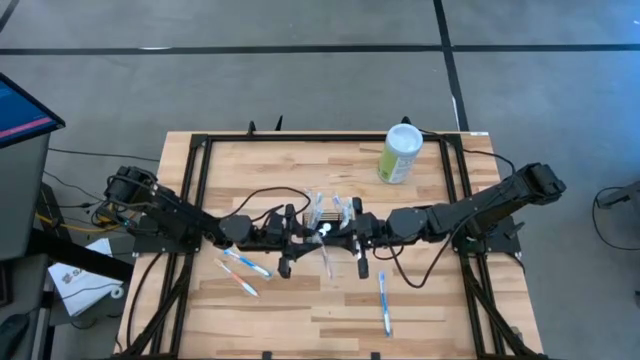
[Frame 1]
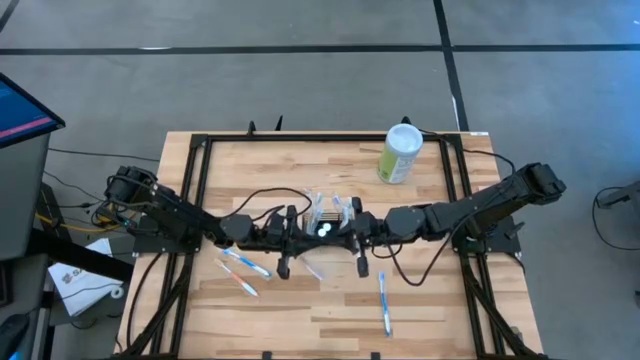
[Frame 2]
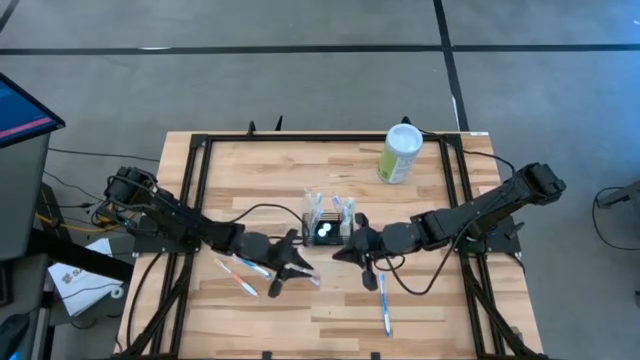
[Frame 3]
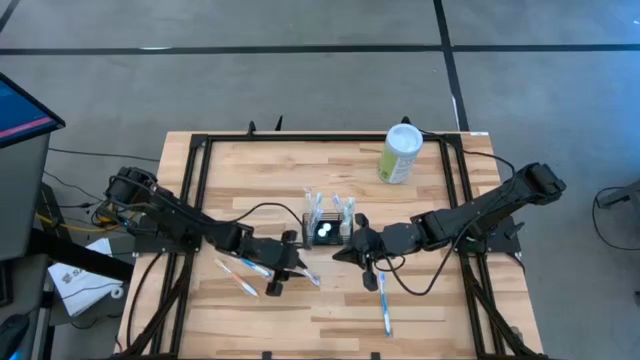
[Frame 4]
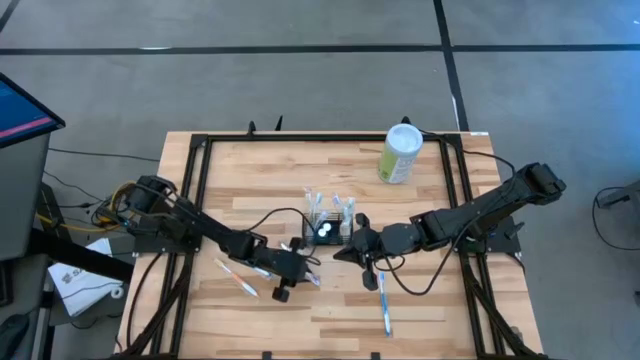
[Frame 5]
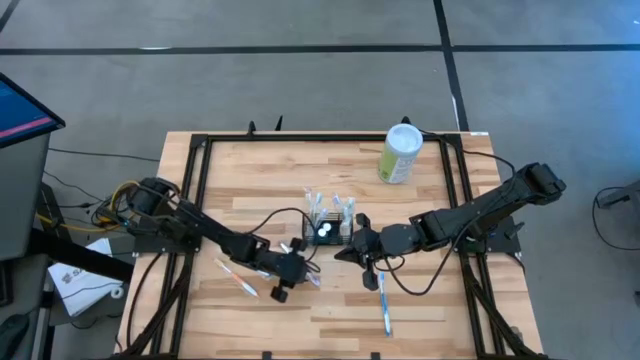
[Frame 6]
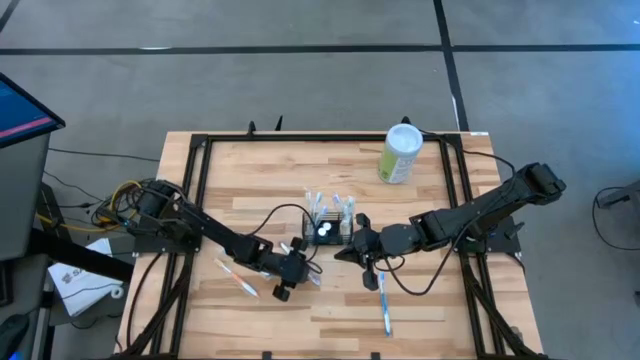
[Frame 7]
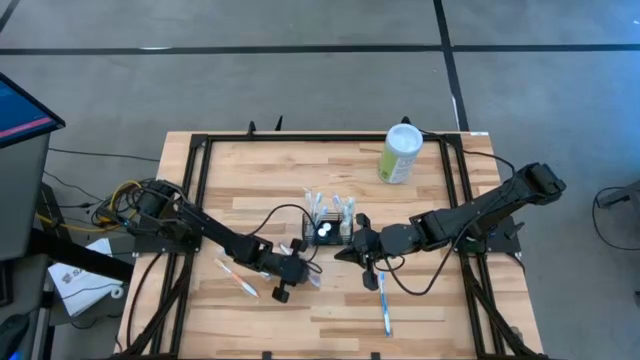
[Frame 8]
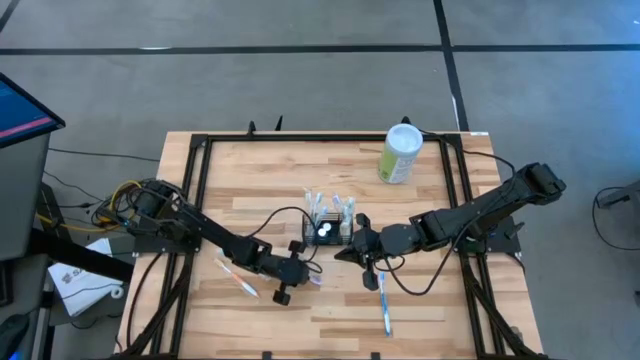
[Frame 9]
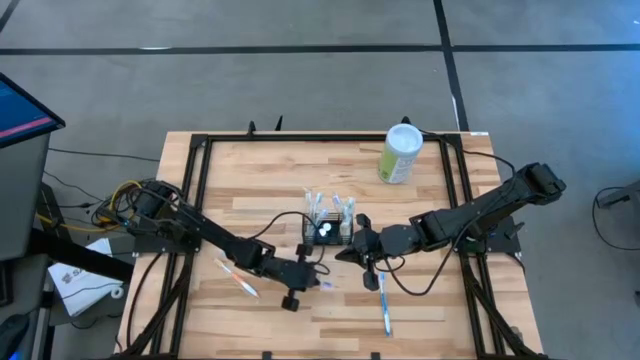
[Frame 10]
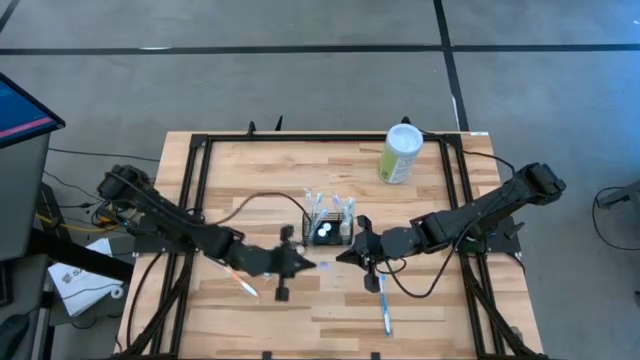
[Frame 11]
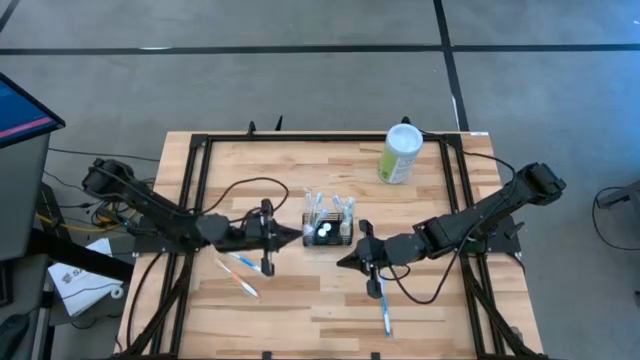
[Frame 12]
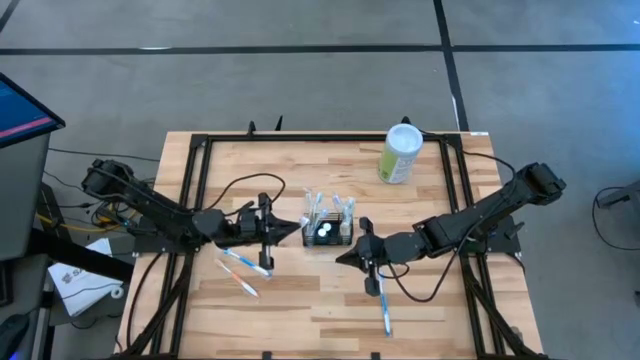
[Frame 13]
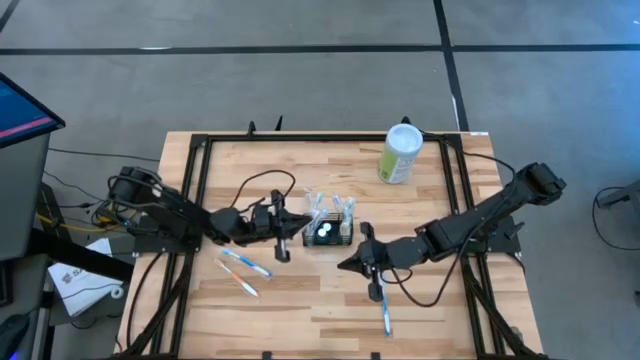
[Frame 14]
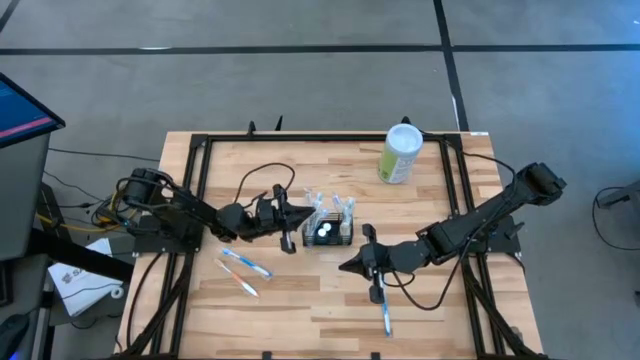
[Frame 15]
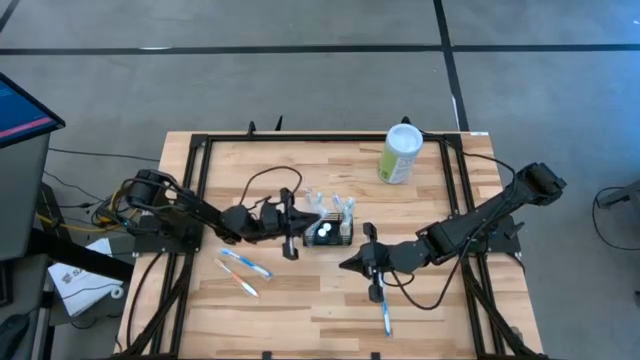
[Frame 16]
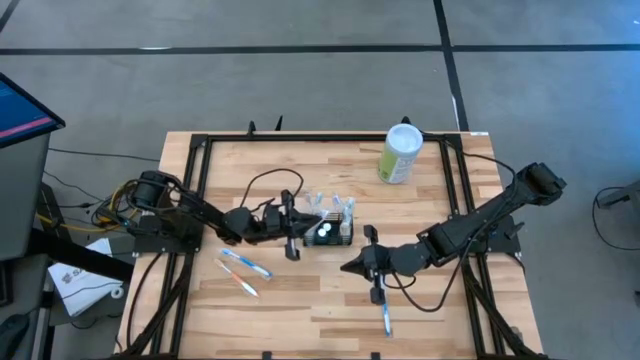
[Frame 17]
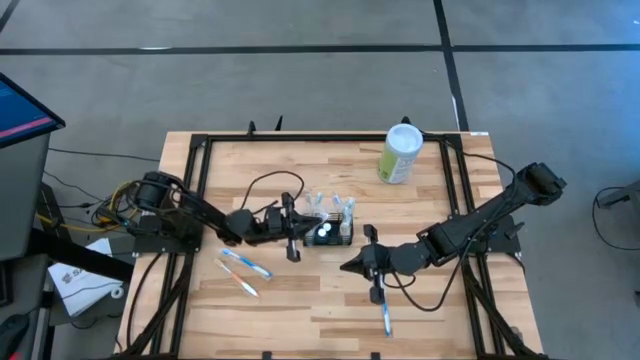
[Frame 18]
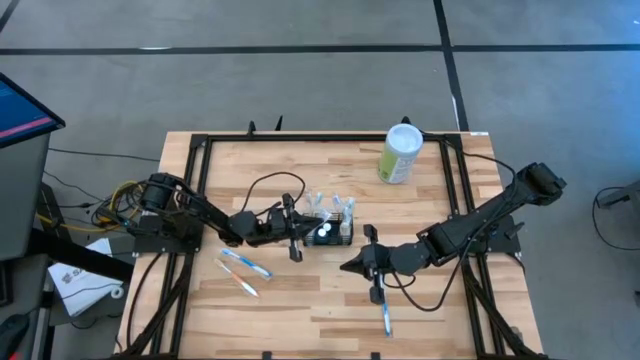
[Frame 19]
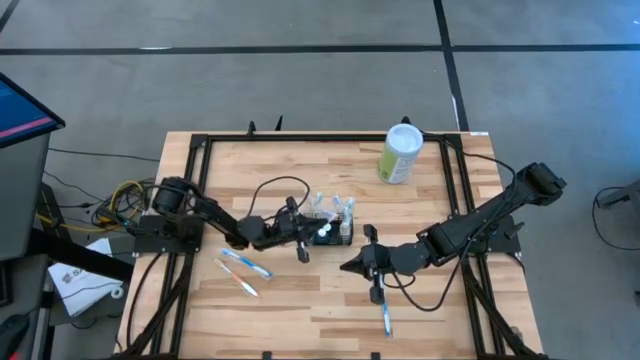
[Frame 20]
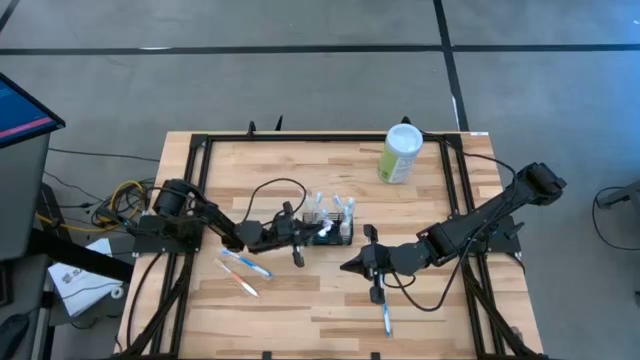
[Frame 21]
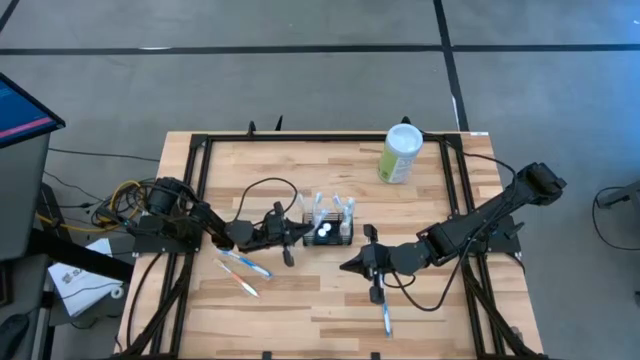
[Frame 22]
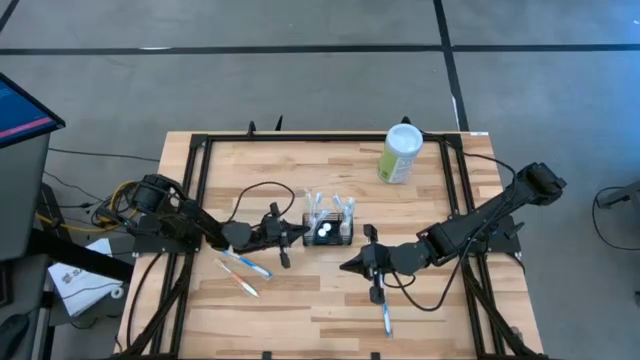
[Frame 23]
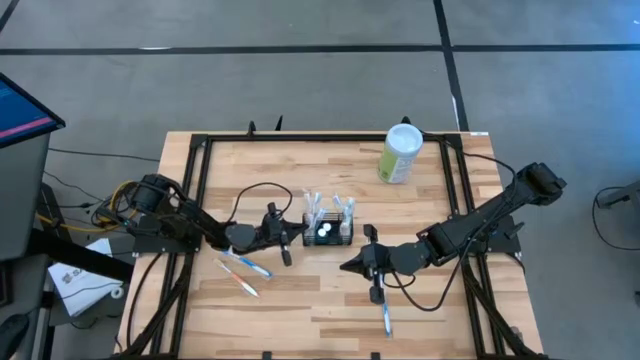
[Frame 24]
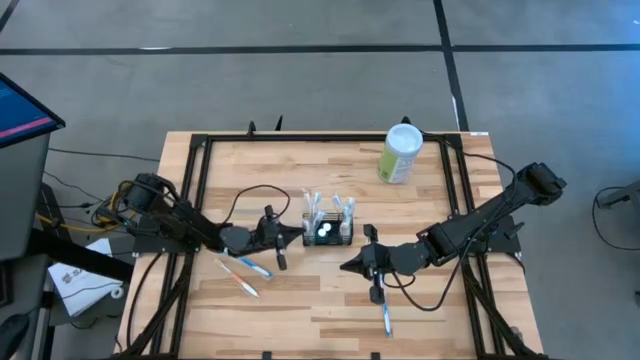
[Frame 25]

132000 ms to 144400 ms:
Task: Pick & Place toothbrushing station
Put the purple toothbrush into the left compartment of the organizer

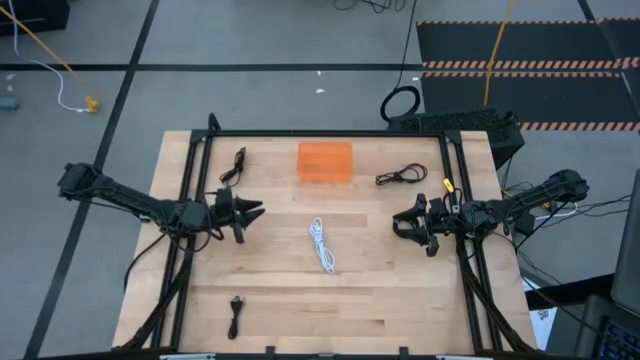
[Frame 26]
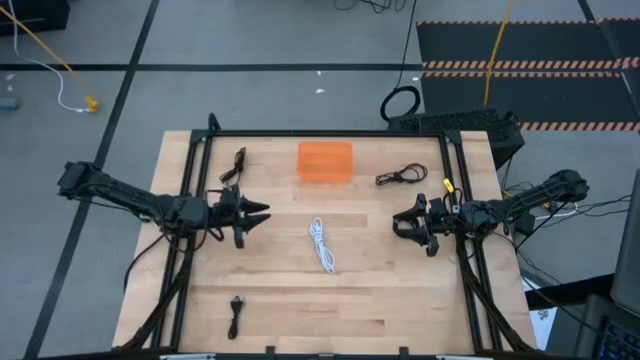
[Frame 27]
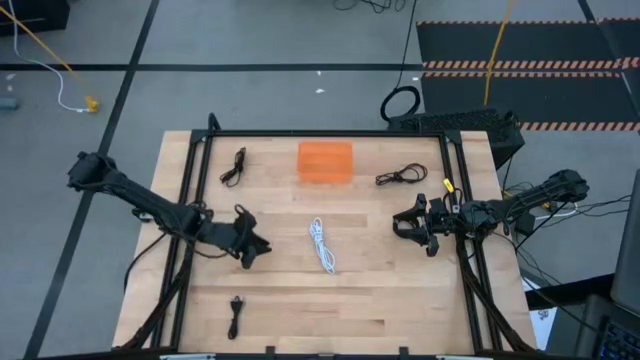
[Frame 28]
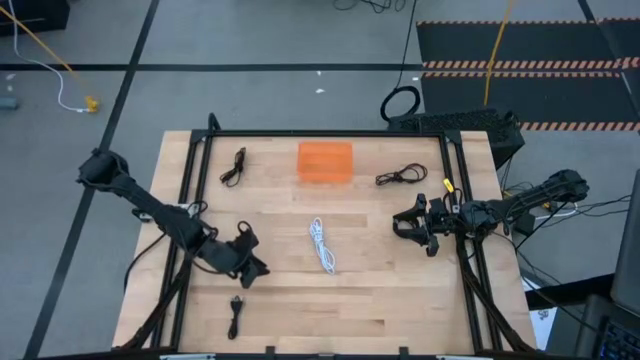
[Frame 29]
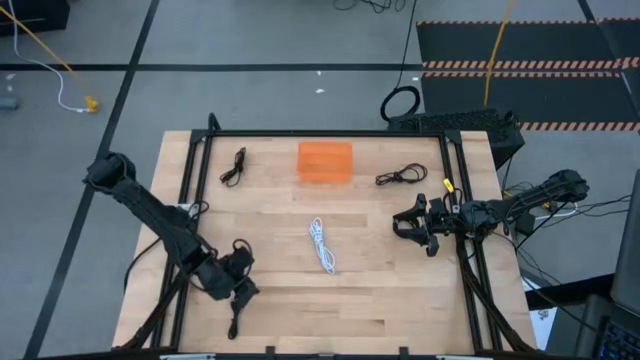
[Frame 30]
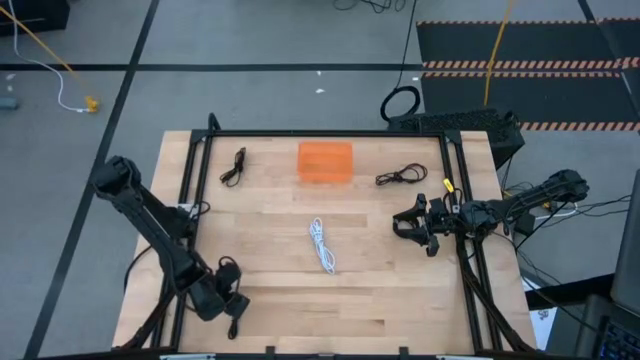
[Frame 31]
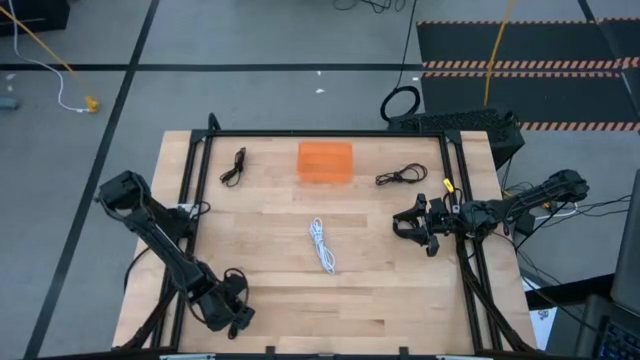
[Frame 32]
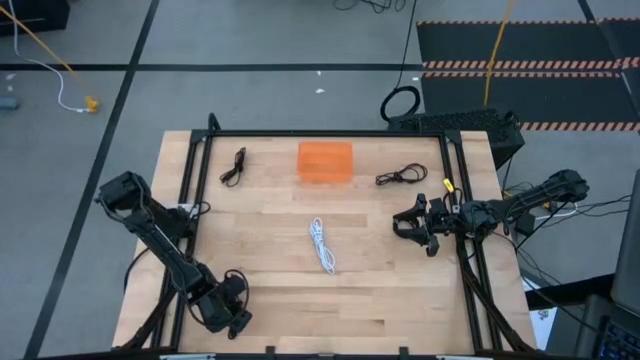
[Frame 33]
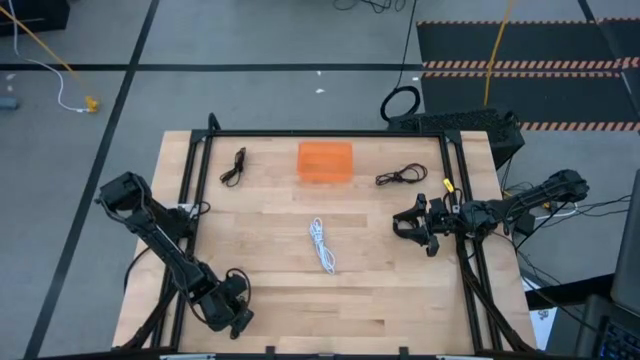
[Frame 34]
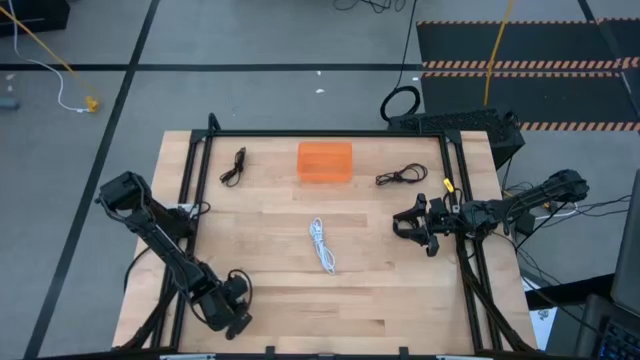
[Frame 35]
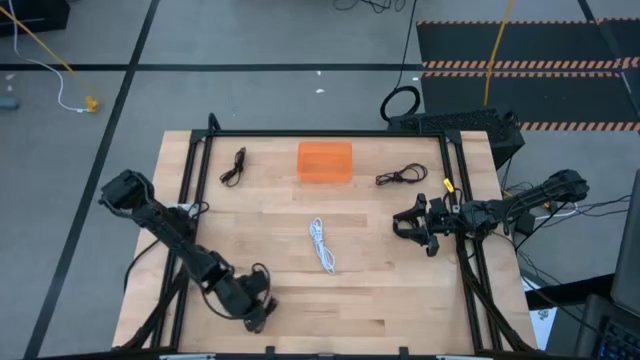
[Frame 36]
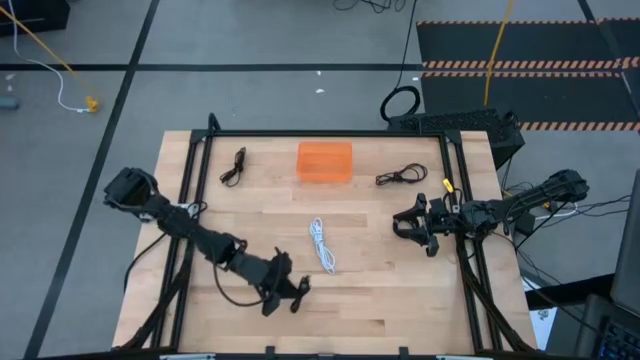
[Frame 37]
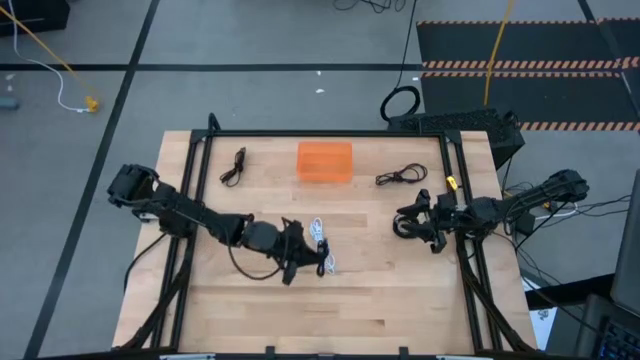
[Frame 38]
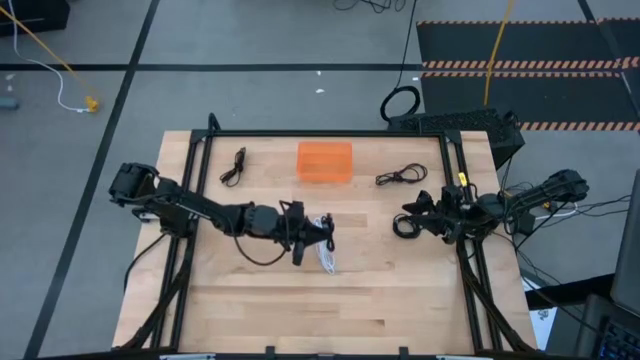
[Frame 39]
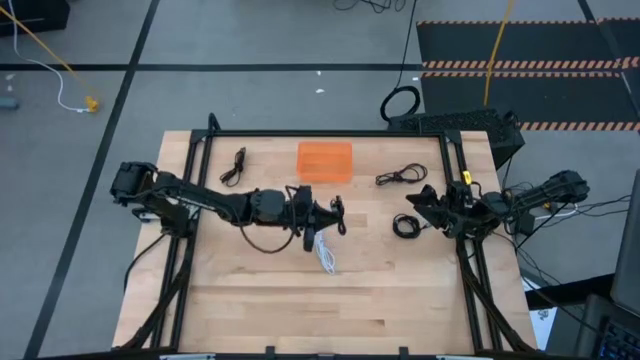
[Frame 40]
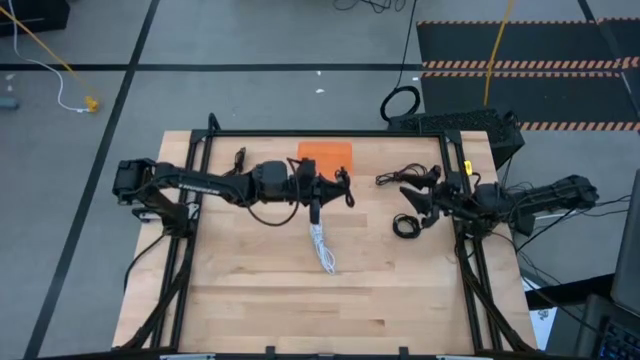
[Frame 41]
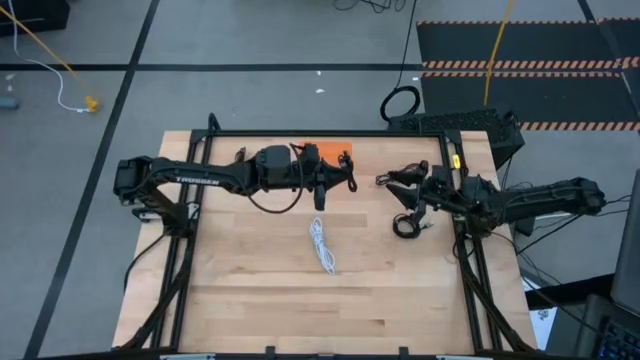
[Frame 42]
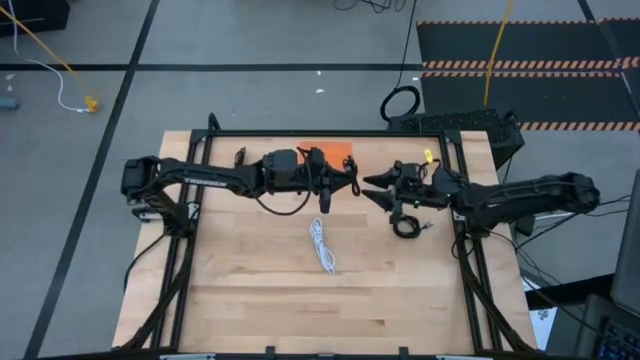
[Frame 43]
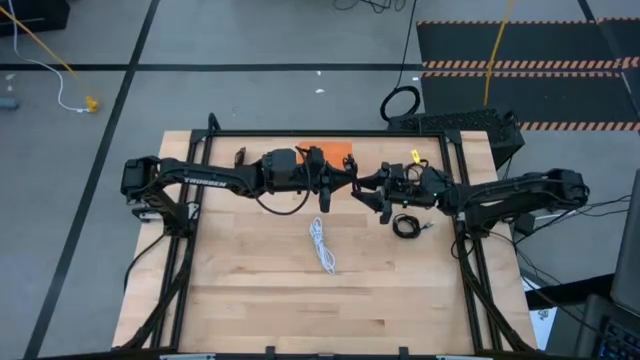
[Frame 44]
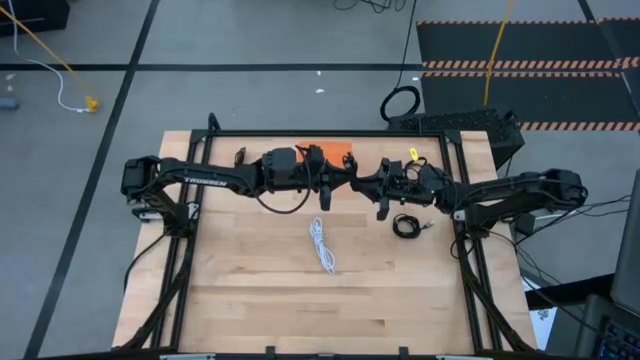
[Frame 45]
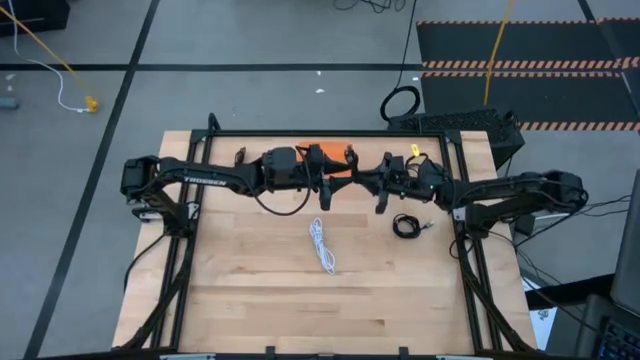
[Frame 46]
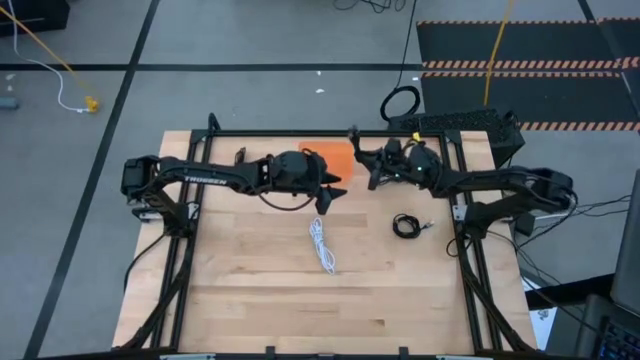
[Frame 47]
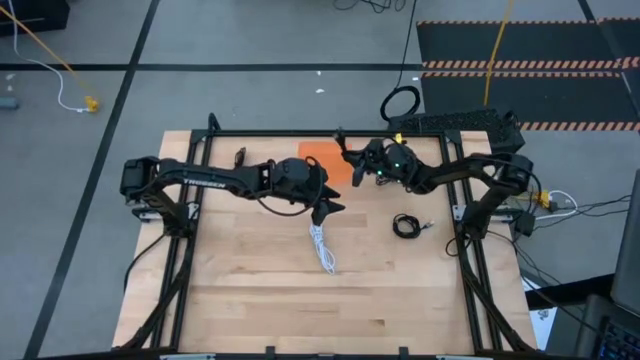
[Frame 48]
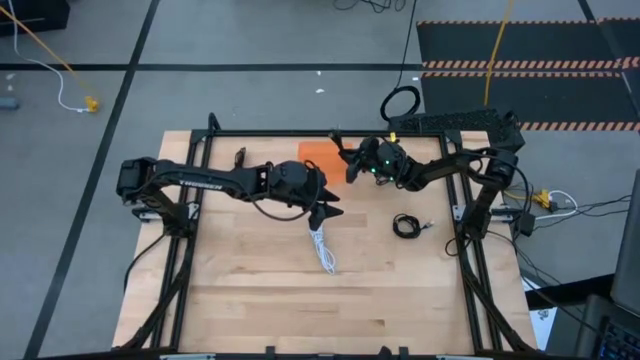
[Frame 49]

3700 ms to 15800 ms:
Task: Pick and place USB-C Cables
Put the black charger cable into the orange bin
